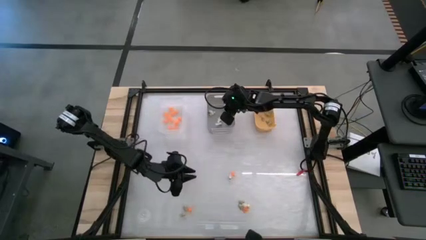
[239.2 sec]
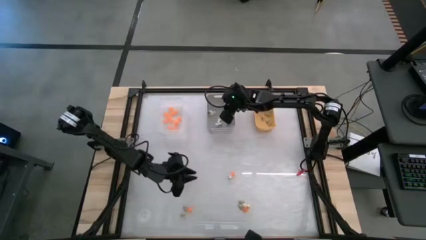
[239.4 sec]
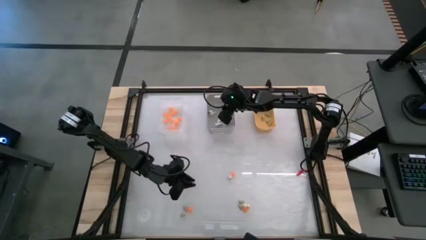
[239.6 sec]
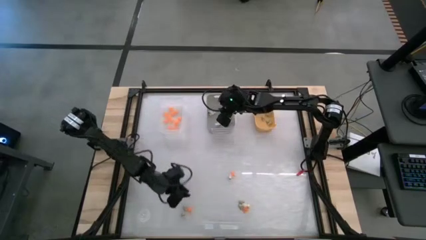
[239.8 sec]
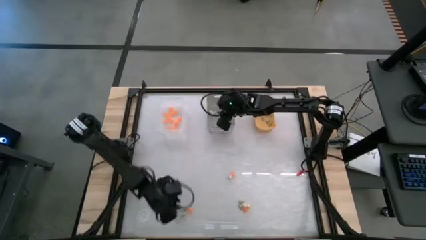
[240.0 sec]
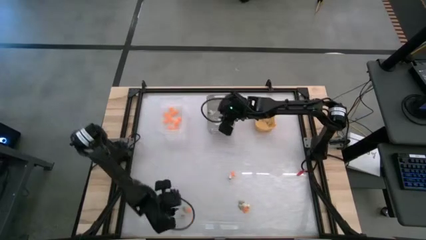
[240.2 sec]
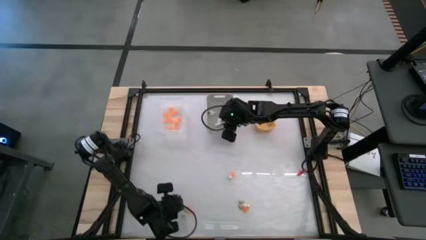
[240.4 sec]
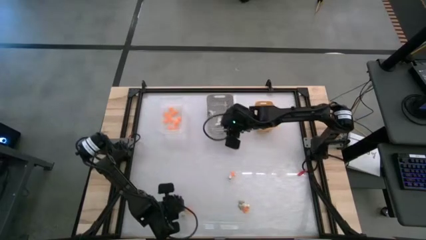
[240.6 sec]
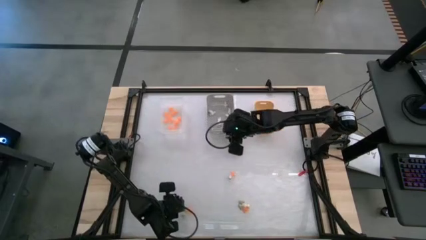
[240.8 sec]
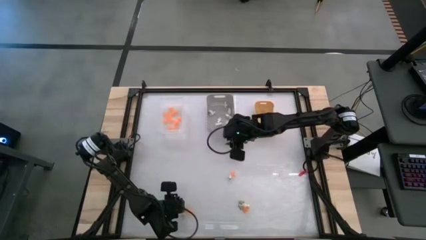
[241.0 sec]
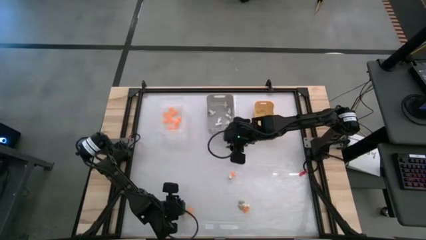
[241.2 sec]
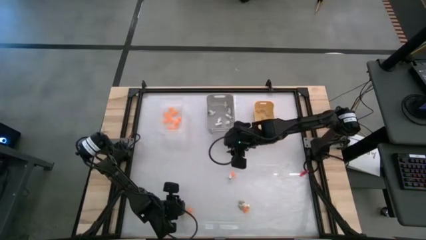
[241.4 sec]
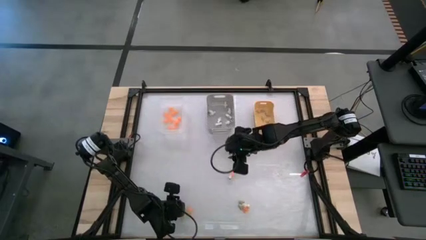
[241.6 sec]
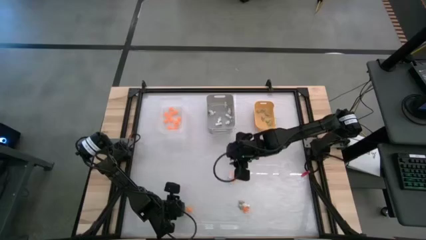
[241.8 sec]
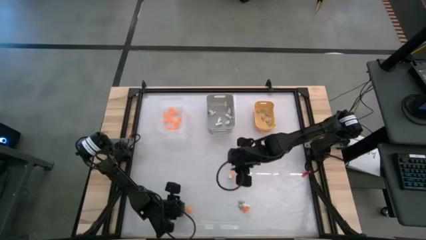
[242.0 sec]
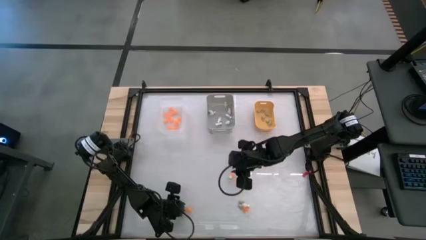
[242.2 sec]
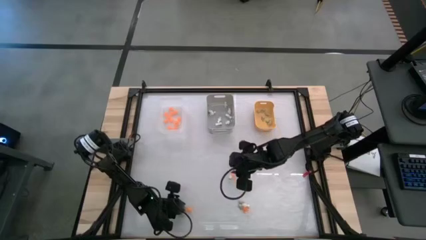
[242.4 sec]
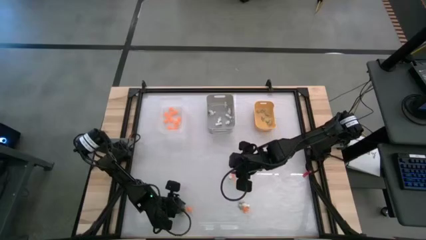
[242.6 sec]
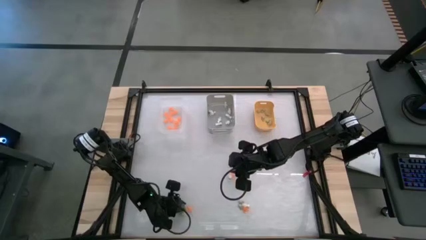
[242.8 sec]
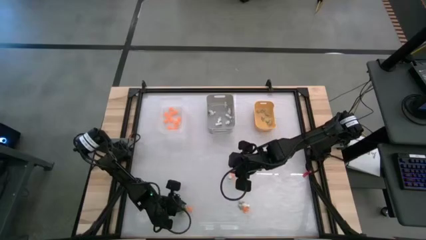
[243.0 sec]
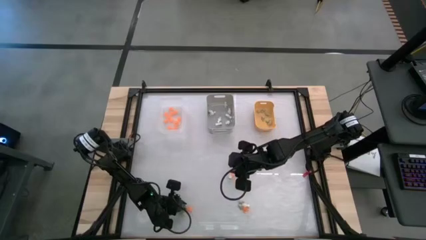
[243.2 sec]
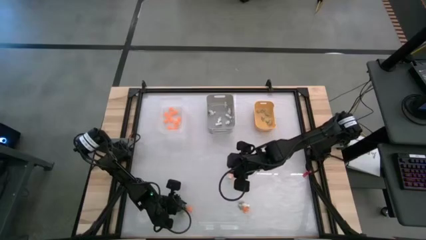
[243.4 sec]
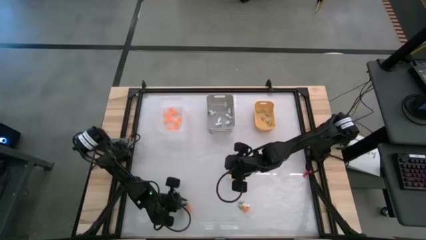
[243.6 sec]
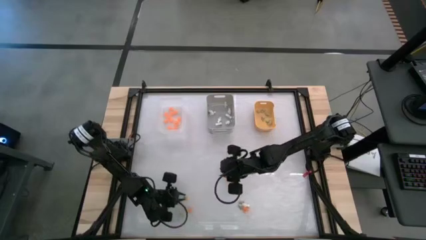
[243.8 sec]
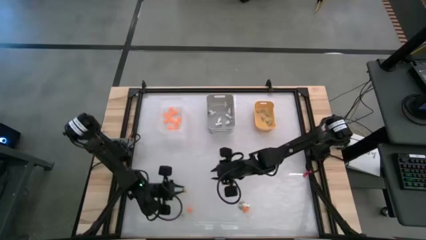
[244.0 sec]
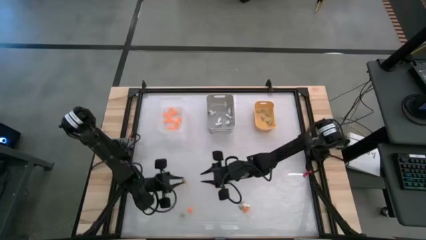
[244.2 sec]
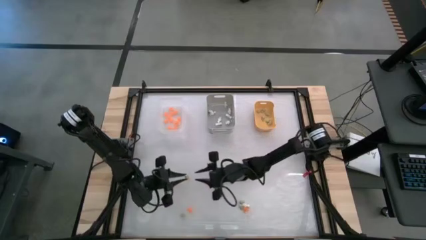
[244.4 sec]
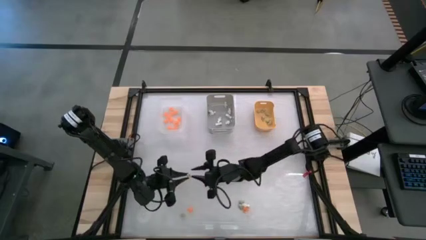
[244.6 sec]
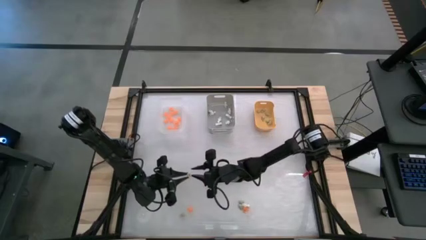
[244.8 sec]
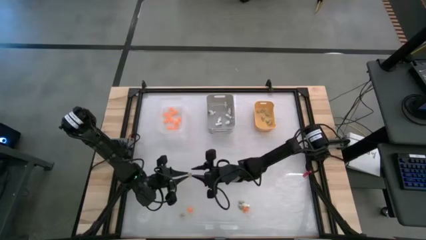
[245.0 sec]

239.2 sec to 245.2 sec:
Task: Sort Halloween decoration
Put the cream white skull toy into the yellow bin

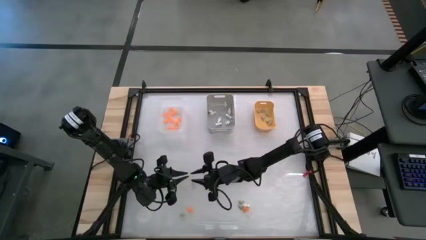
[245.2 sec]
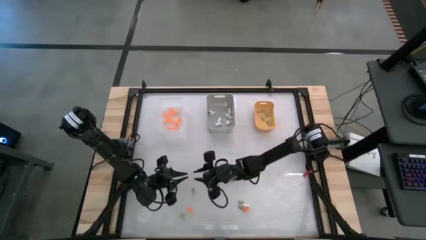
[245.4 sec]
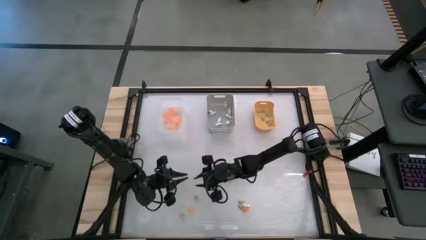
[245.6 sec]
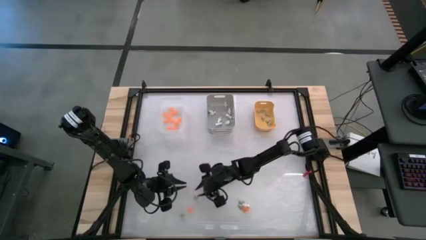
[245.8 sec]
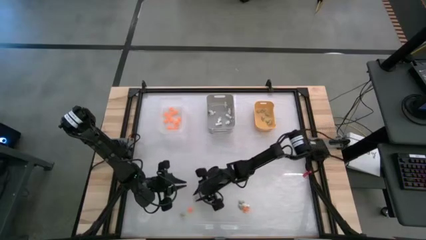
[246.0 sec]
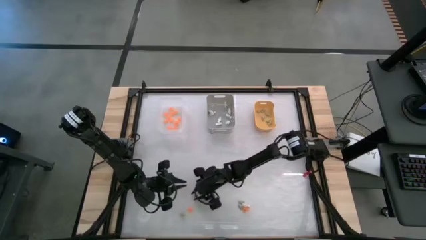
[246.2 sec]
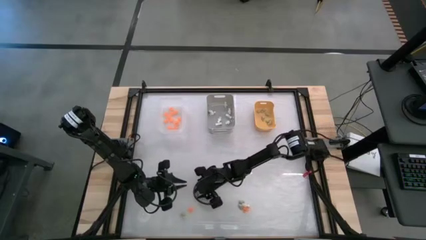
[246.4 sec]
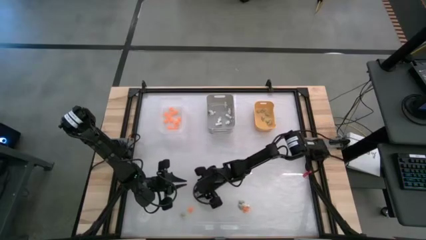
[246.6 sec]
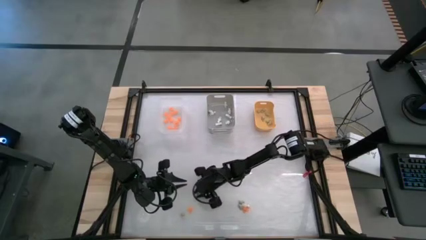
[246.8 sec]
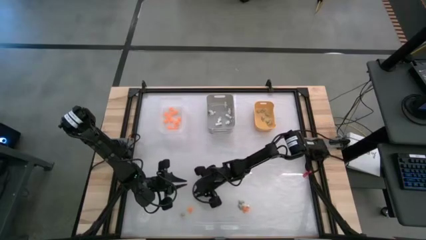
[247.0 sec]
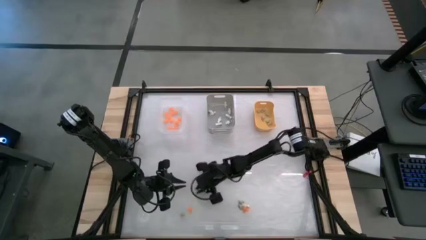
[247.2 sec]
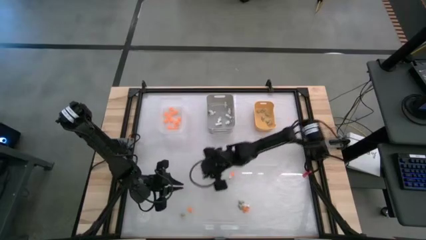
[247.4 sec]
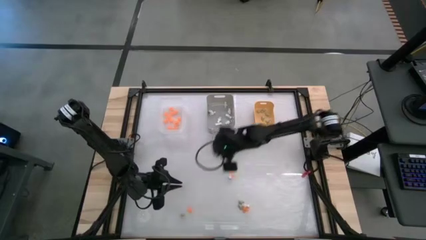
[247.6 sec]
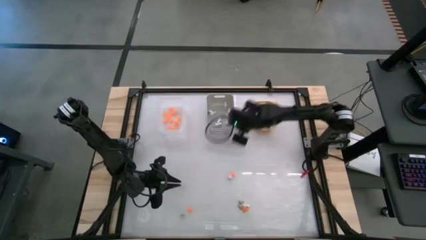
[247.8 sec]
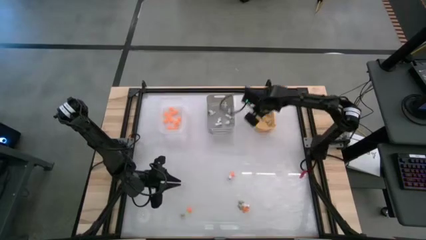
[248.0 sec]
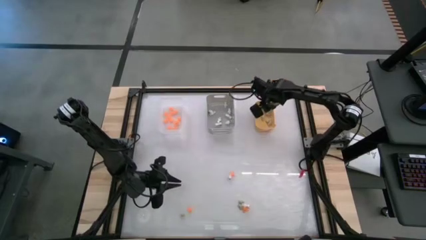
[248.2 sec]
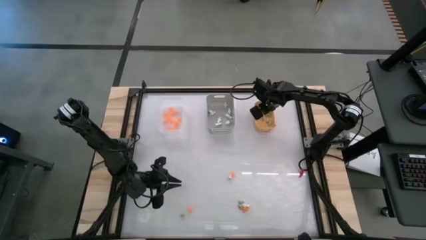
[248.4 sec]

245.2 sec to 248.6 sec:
Put the cream white skull toy into the yellow bin

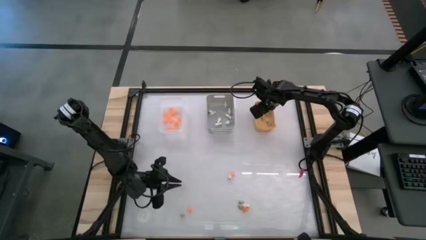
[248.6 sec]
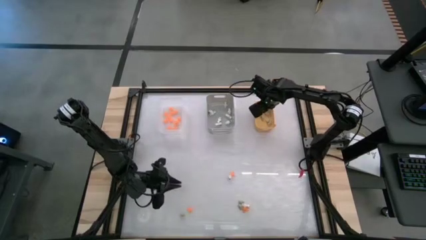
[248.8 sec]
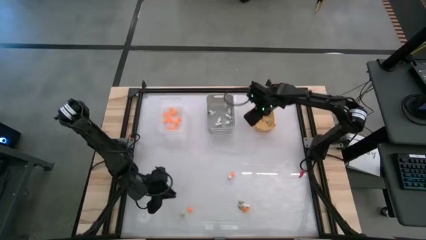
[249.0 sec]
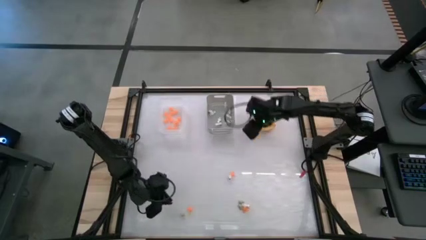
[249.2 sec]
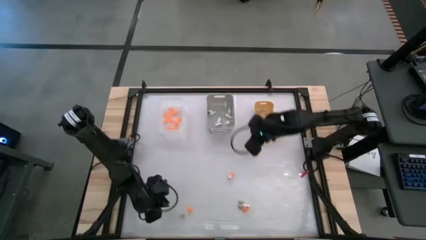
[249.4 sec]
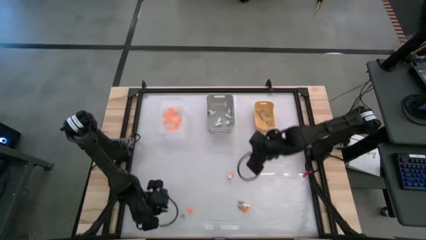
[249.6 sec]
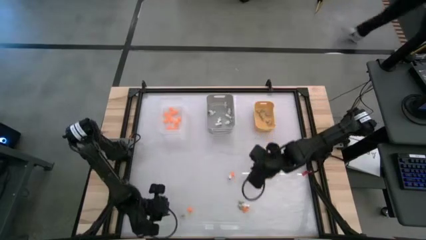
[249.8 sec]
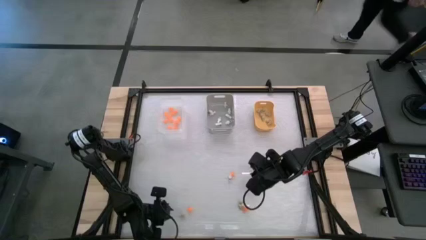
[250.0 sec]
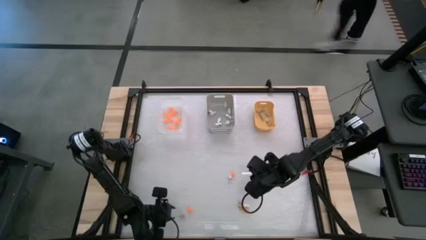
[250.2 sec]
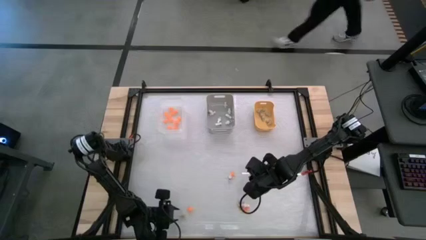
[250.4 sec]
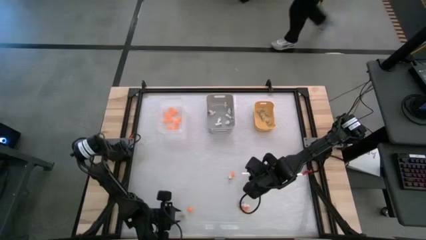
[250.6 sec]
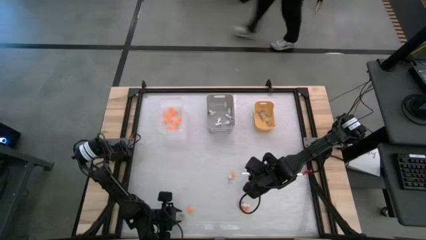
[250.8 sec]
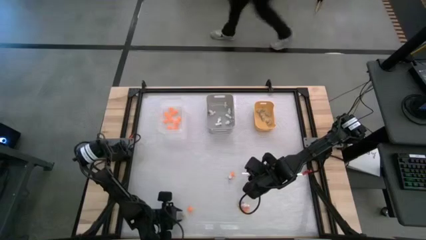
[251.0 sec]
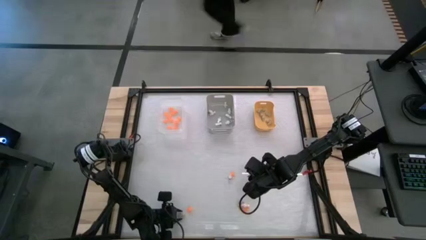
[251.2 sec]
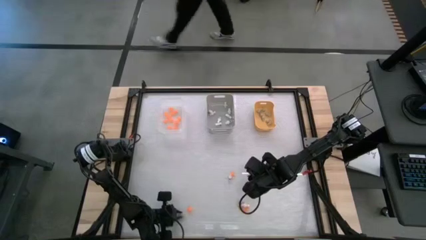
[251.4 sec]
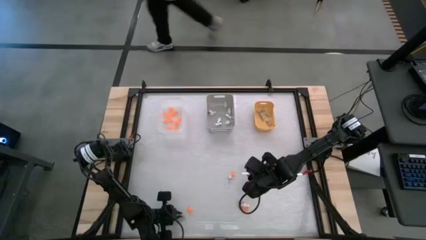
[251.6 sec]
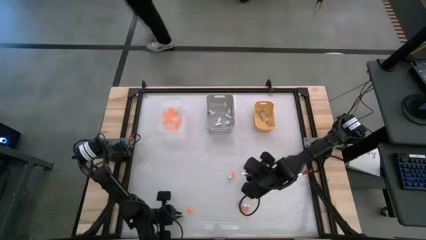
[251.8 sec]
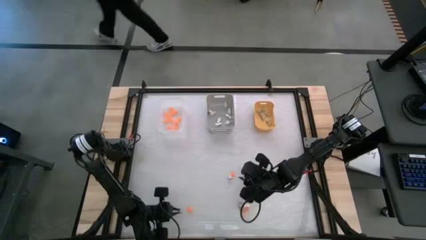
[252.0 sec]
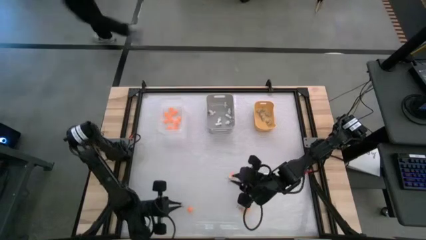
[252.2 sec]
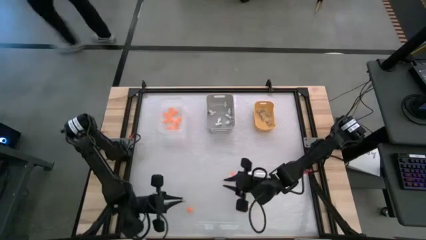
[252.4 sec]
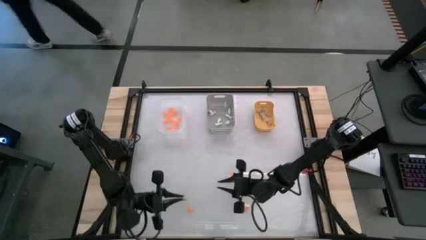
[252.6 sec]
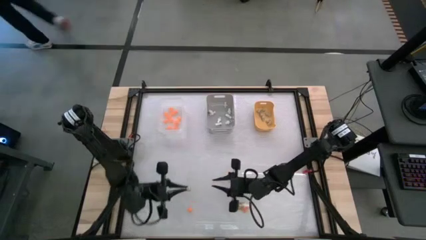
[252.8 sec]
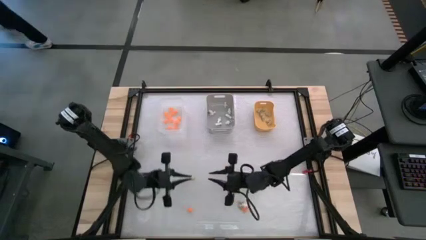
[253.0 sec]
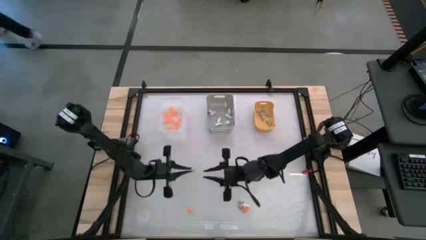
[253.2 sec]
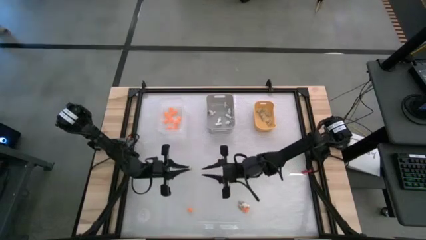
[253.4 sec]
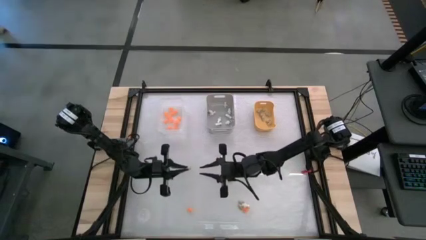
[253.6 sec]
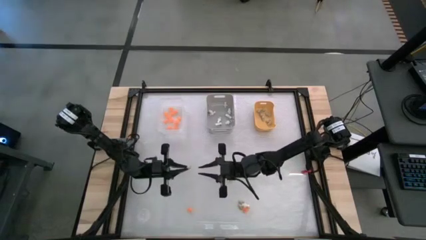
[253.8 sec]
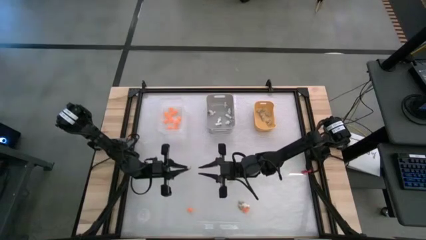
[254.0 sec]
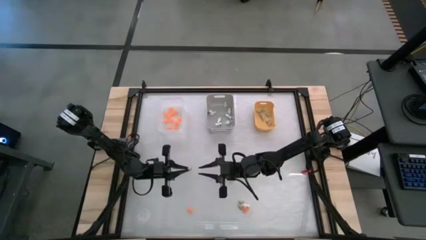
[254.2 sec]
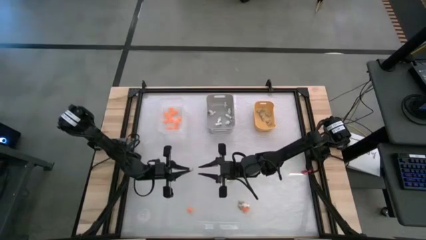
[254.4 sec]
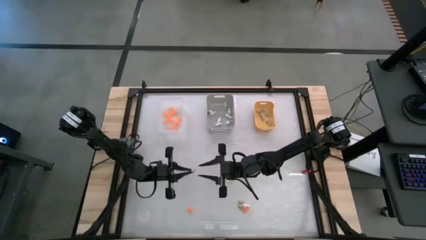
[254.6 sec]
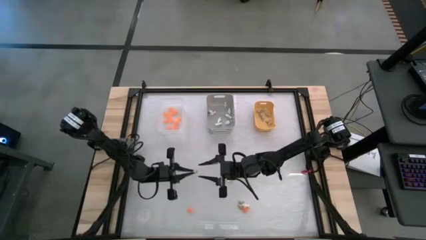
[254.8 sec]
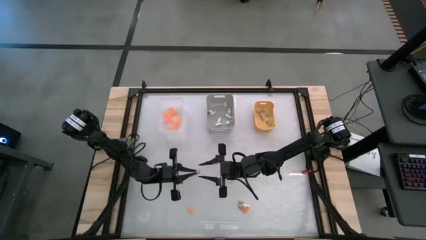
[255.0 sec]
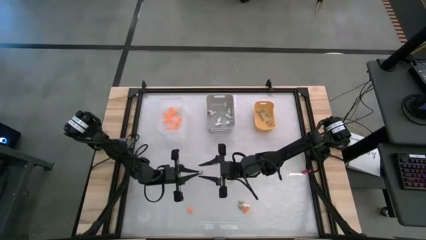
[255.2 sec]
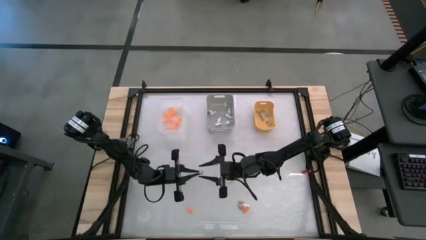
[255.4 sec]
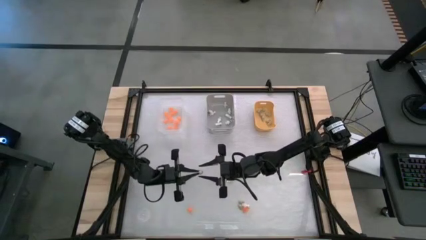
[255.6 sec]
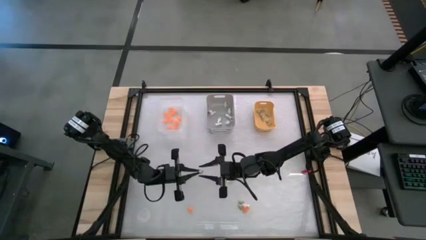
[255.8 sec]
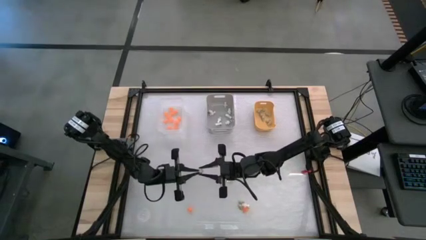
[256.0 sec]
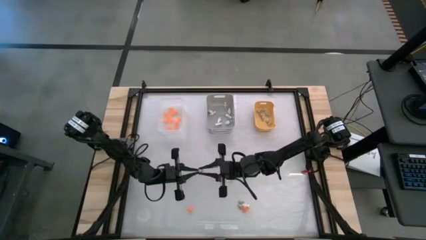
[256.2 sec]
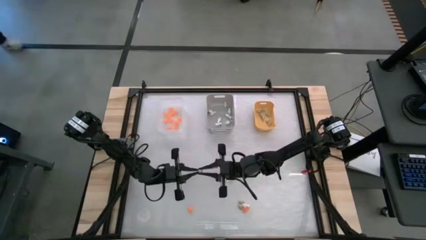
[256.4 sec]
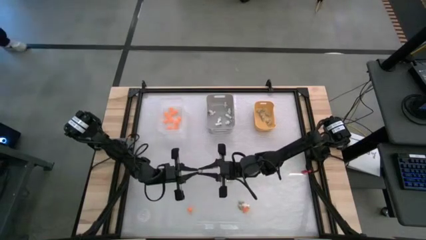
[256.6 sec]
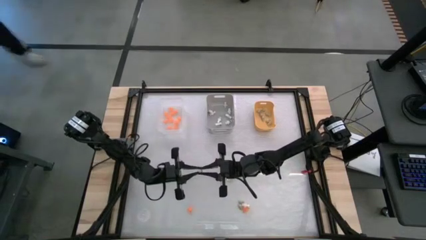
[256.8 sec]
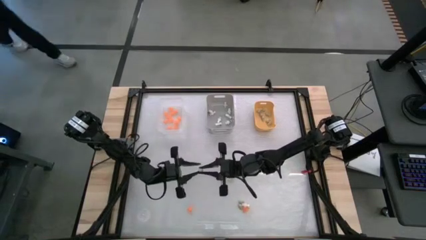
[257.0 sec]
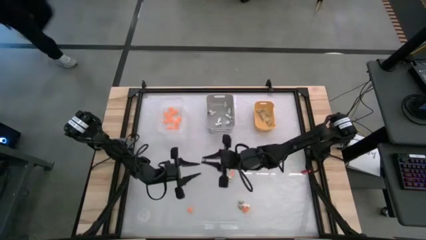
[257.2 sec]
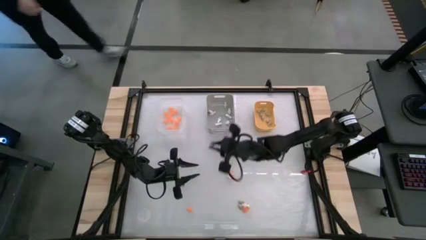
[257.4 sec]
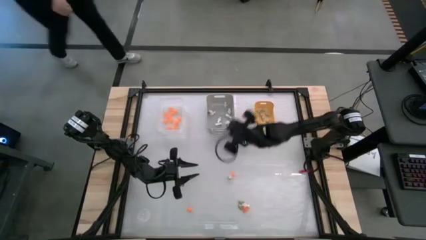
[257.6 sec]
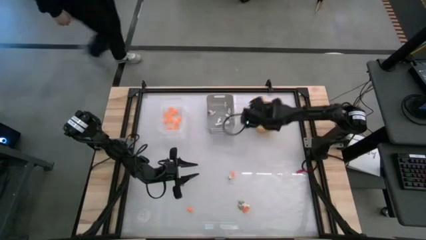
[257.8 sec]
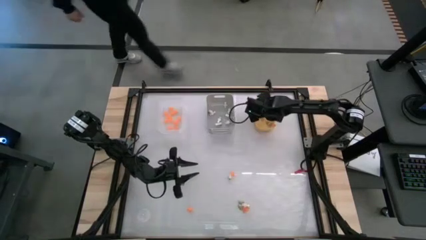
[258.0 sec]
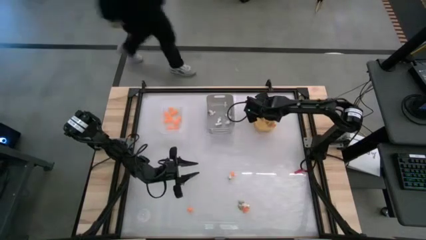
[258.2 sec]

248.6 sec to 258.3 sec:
Put the cream white skull toy into the yellow bin
